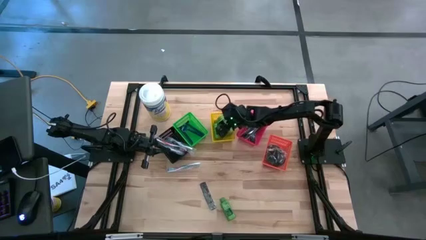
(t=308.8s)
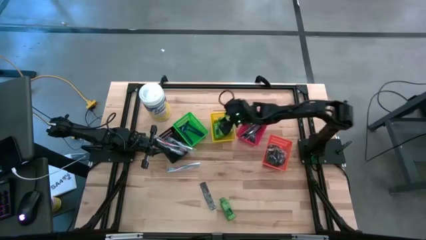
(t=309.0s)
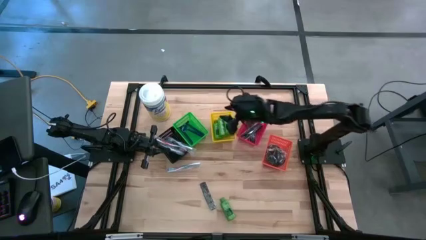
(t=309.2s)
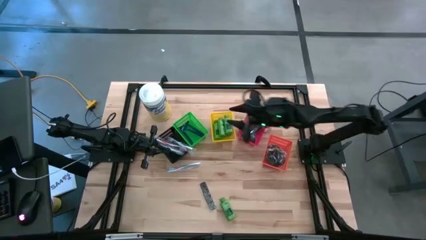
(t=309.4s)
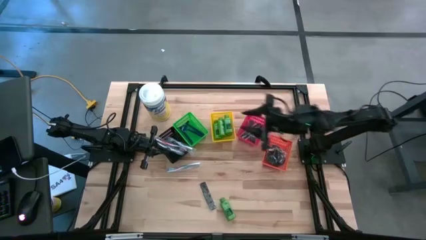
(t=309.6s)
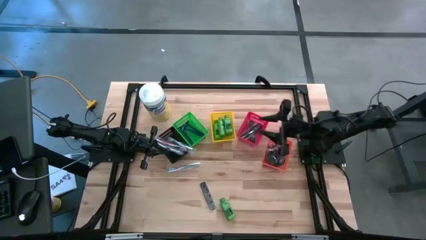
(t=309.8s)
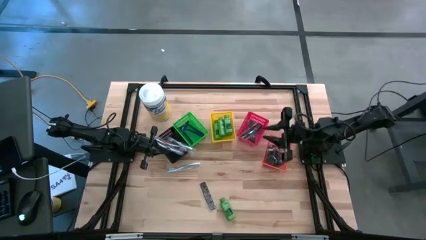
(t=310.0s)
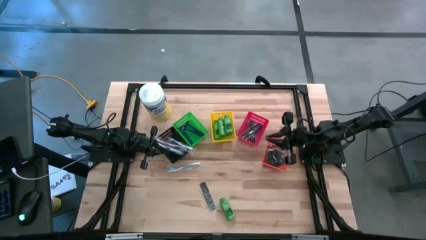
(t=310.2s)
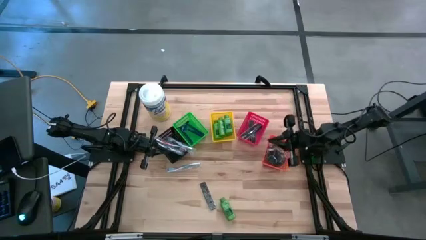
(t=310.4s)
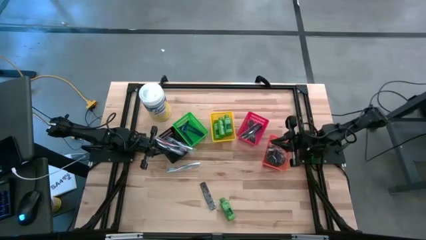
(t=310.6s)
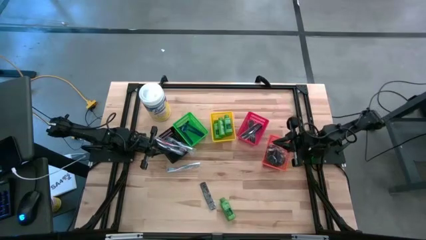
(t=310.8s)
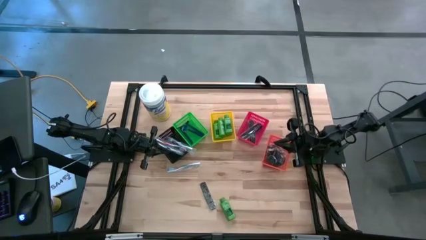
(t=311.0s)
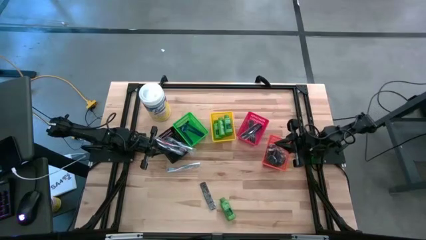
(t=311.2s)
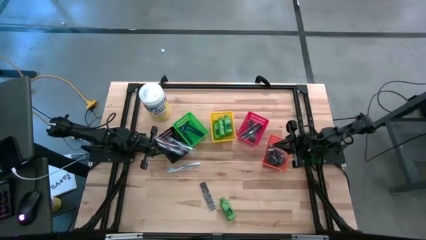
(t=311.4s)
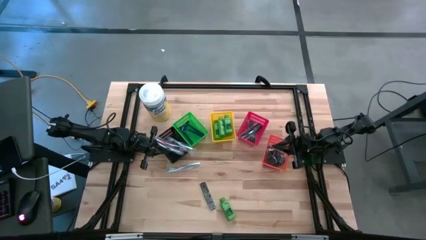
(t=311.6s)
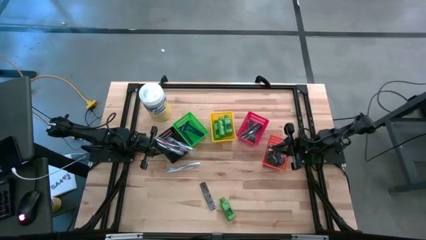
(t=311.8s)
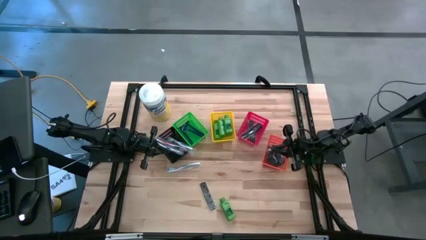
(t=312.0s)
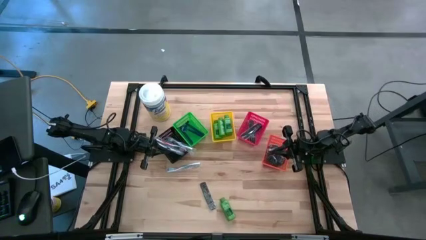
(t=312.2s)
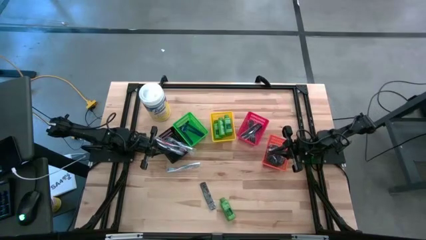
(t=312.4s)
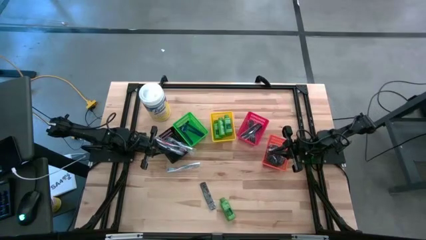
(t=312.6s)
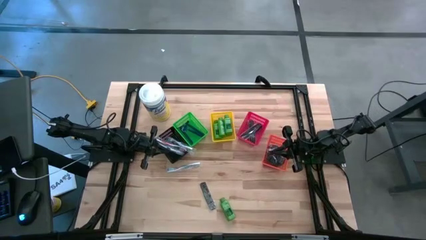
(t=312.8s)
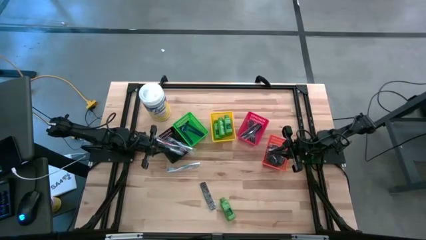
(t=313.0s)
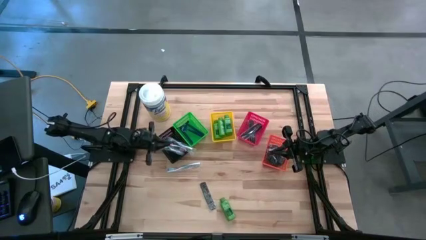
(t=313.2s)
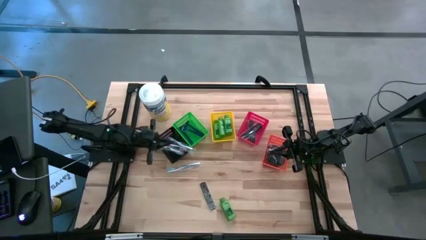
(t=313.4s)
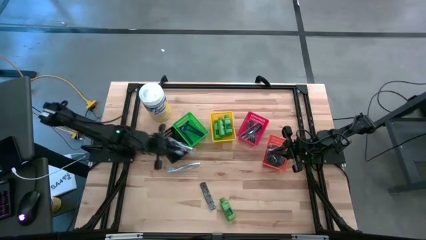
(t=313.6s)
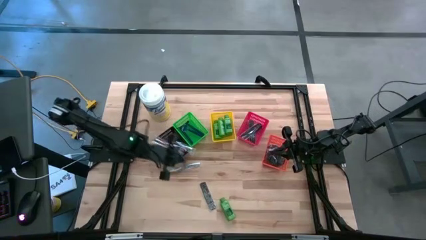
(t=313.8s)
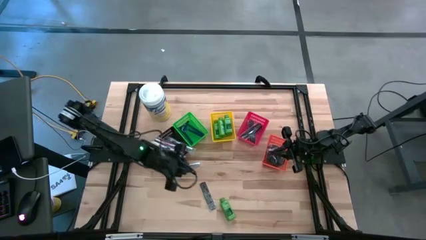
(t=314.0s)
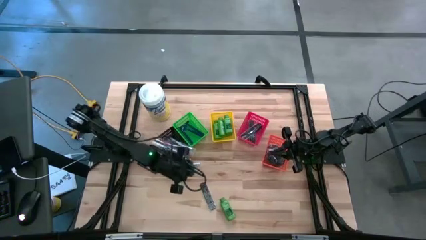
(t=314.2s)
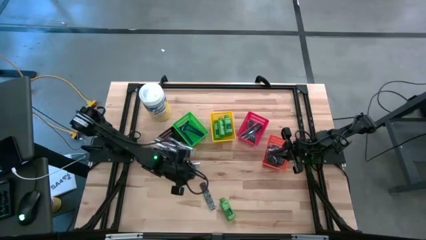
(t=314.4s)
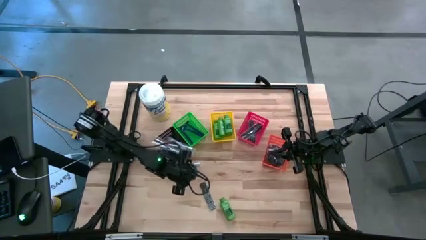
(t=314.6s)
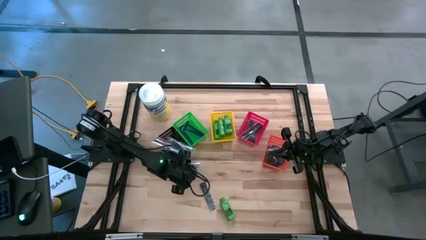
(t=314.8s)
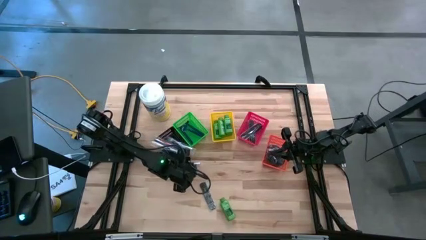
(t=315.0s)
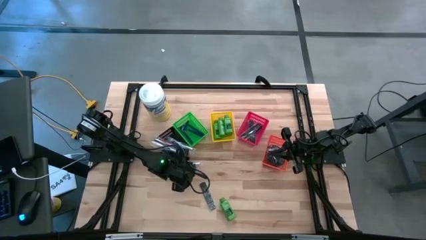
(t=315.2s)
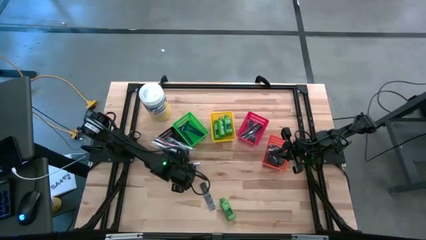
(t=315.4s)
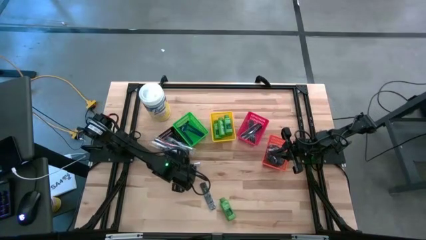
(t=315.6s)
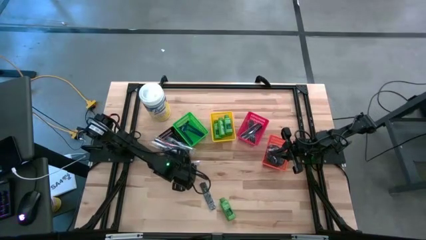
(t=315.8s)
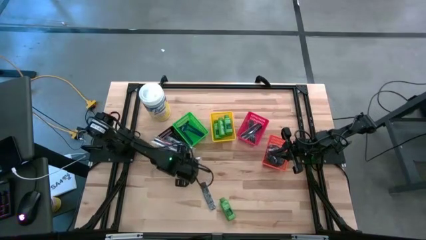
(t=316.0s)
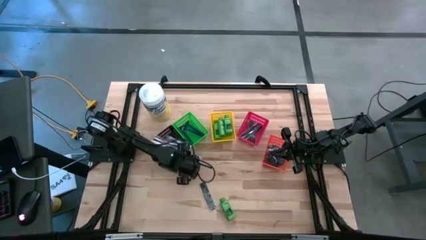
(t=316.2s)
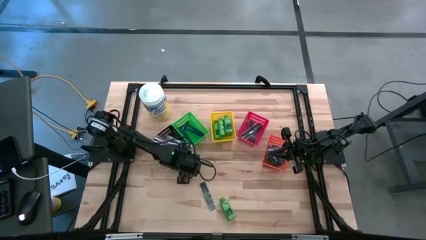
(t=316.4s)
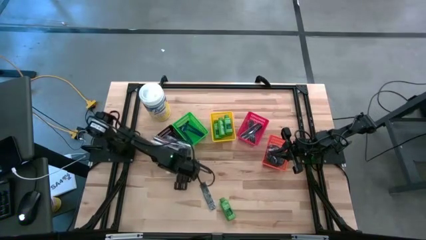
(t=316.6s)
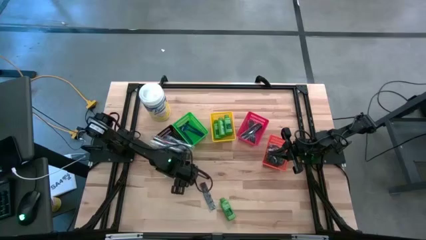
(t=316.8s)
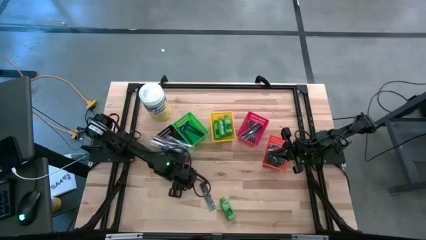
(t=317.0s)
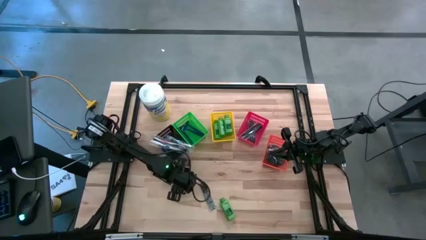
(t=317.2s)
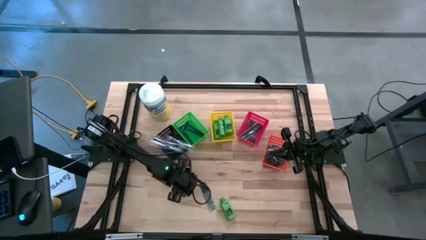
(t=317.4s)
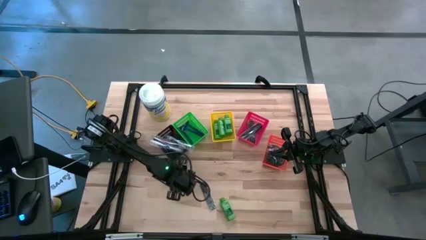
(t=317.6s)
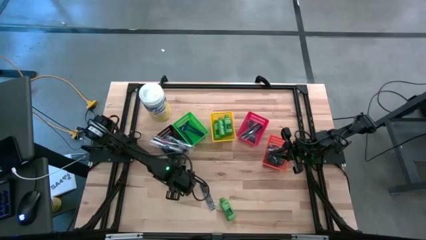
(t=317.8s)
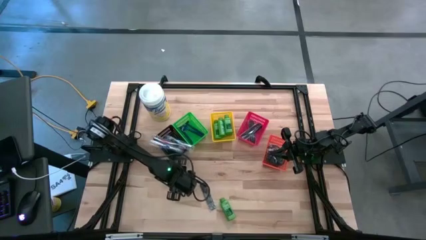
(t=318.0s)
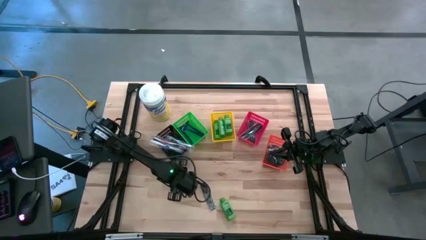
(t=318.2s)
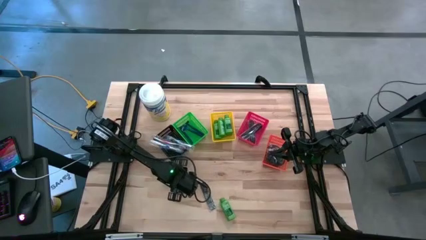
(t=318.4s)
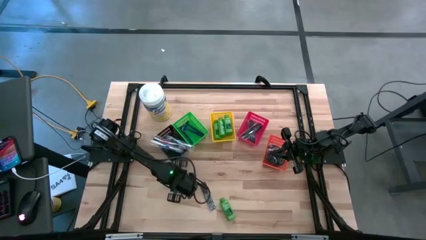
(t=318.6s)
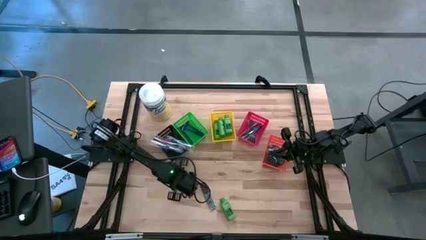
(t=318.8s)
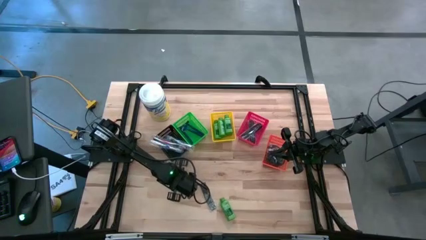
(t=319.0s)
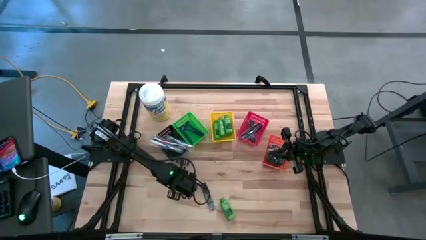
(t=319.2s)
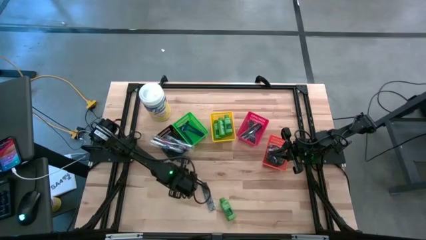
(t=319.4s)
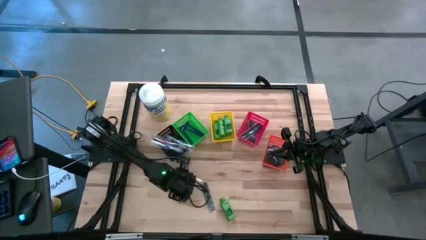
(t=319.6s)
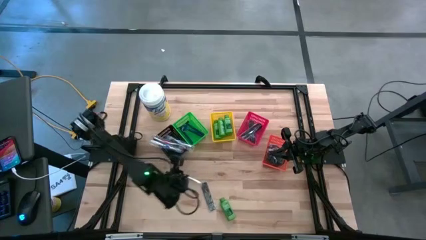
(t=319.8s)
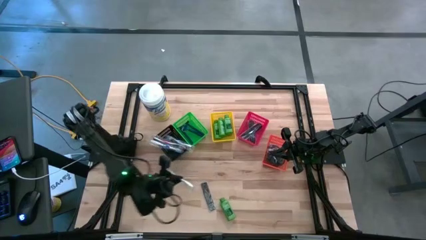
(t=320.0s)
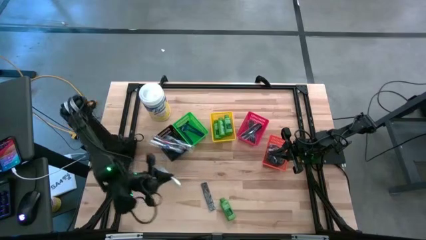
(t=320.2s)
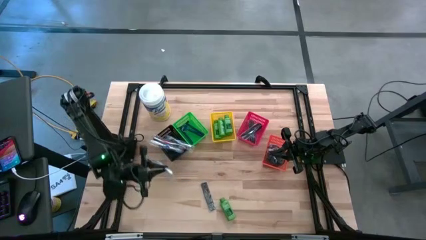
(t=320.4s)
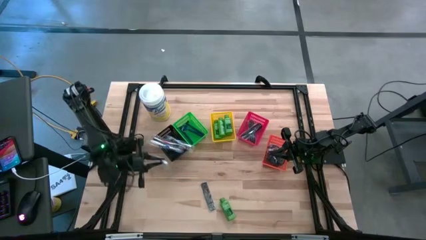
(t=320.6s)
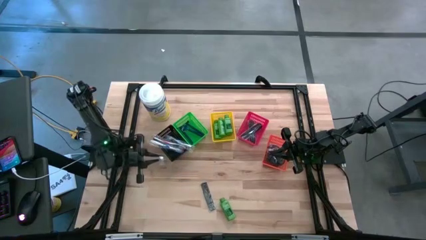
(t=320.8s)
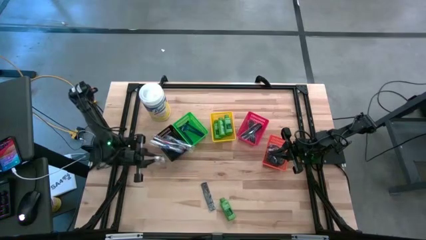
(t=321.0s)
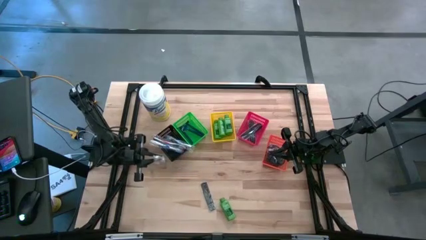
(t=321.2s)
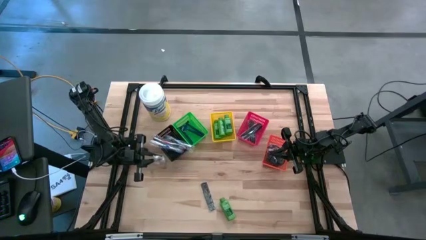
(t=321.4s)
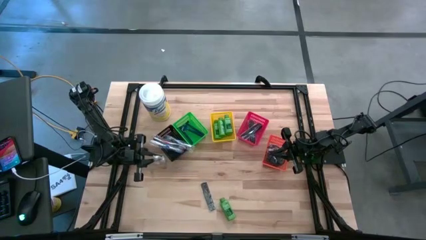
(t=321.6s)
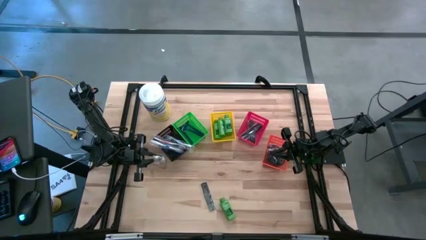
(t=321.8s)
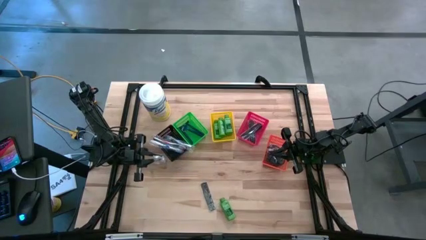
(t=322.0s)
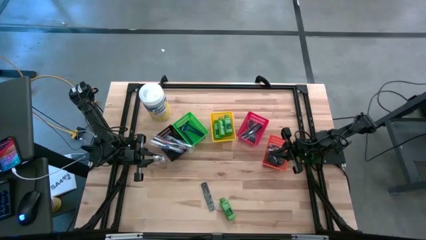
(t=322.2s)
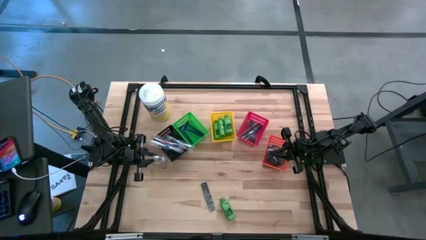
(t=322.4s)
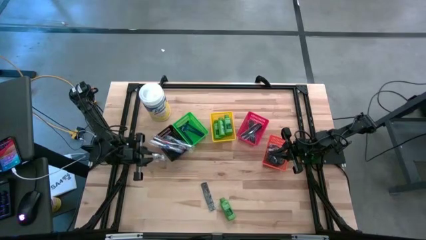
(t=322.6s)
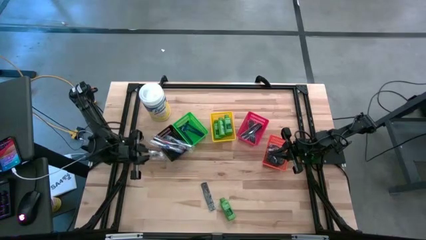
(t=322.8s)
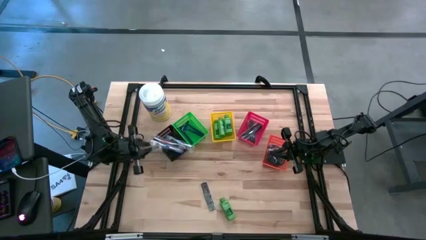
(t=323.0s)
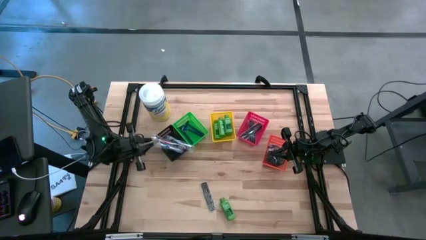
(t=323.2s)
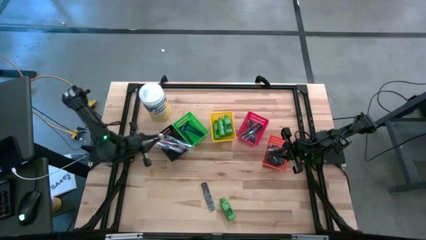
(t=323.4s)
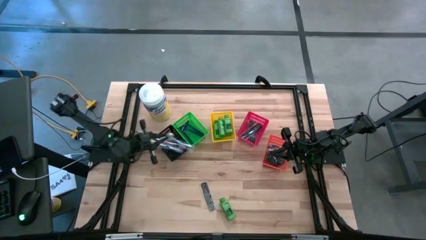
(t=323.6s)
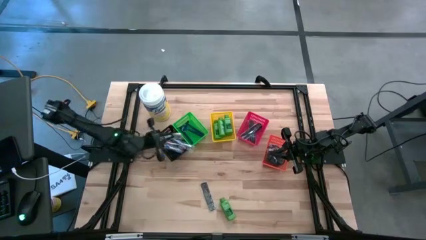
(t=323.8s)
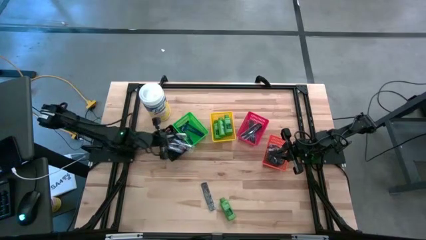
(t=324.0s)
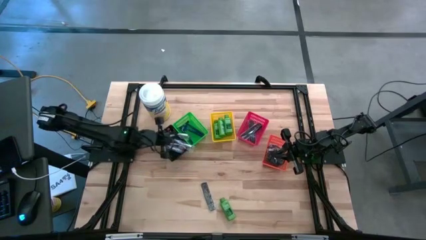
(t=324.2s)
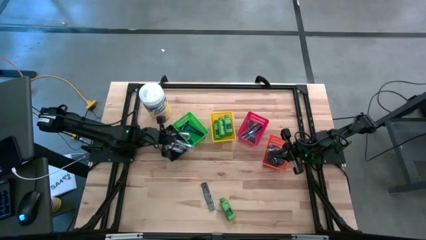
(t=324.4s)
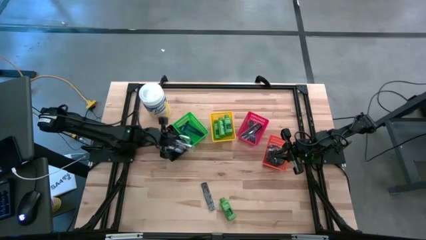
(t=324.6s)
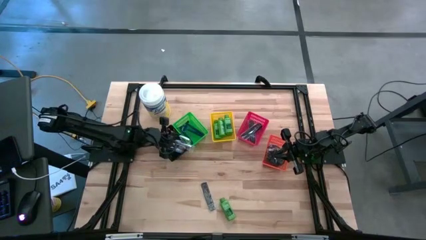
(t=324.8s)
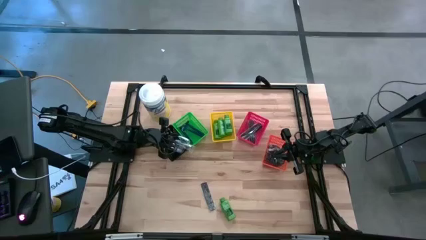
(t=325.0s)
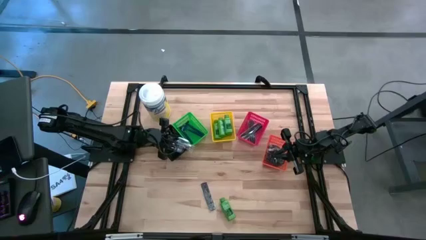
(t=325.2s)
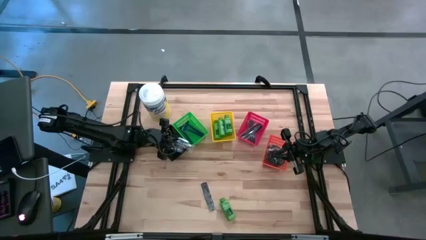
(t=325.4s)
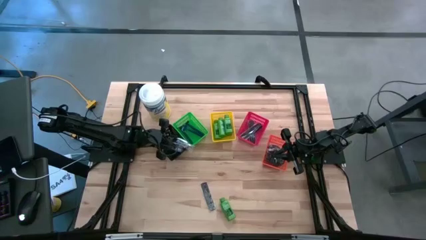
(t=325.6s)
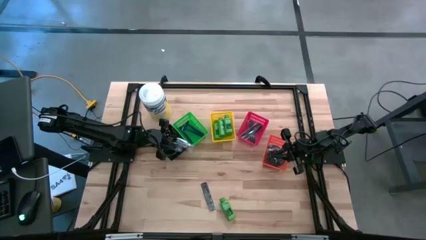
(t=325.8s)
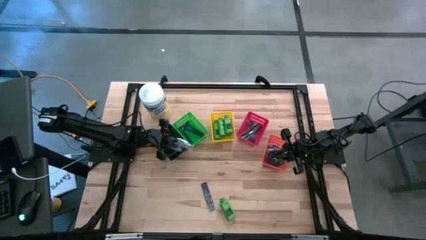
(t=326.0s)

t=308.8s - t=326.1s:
Task: Pick & Place Travel size toiletries
Put the blue toothbrush into the black bin
